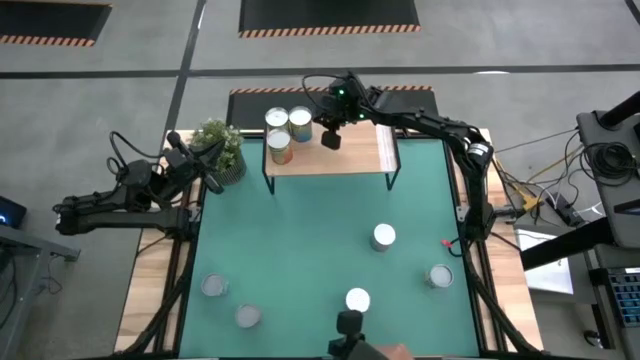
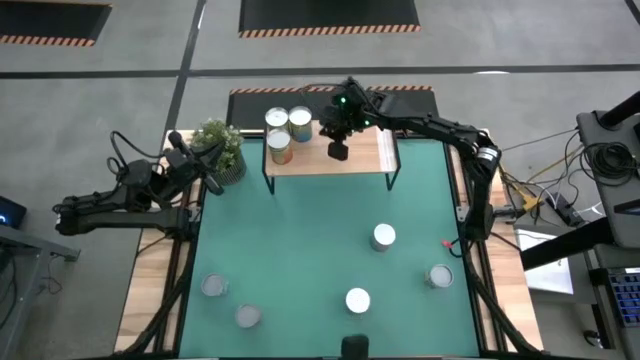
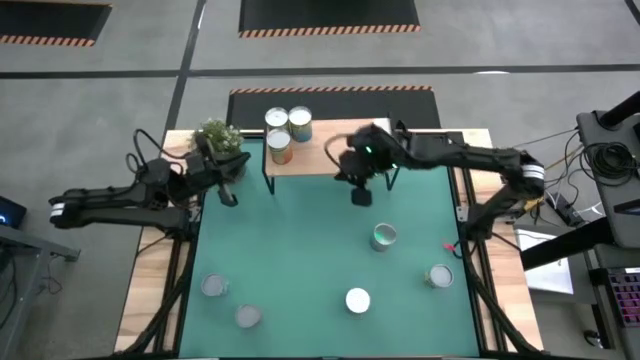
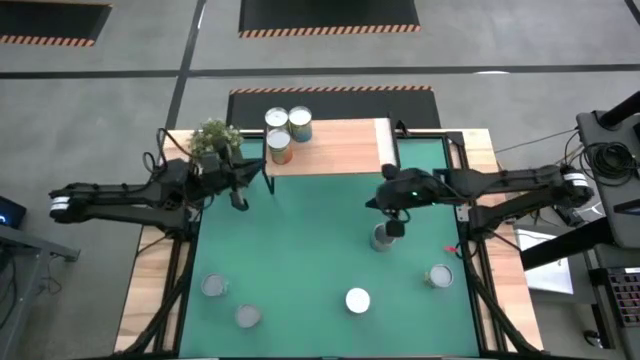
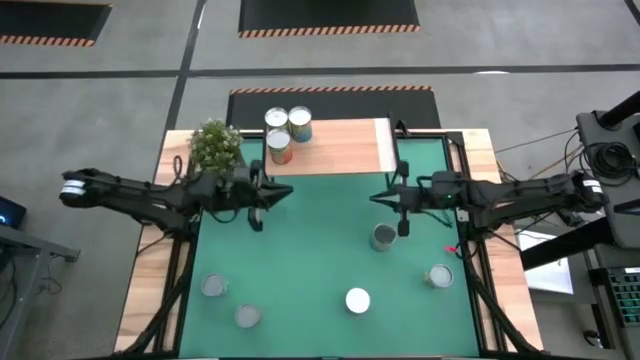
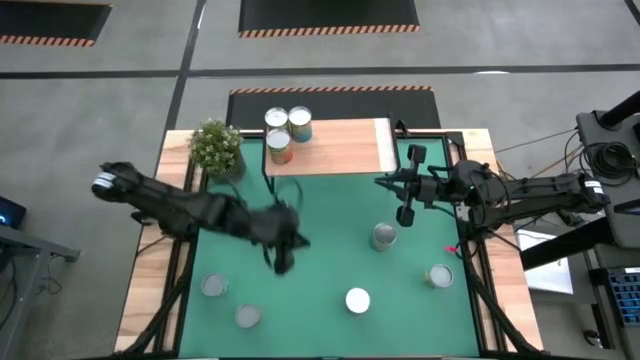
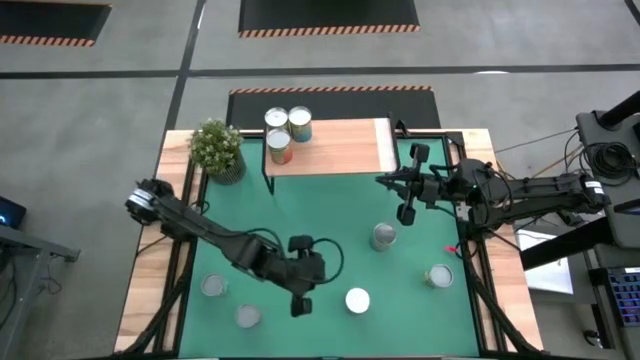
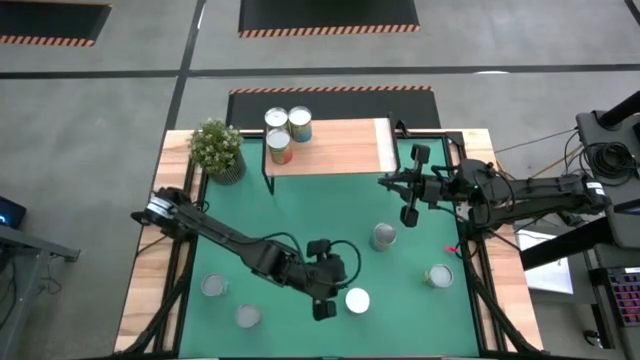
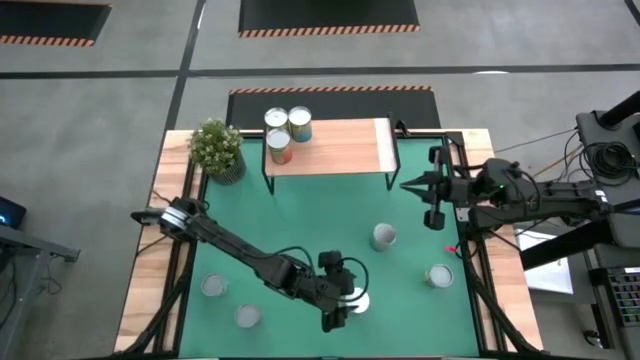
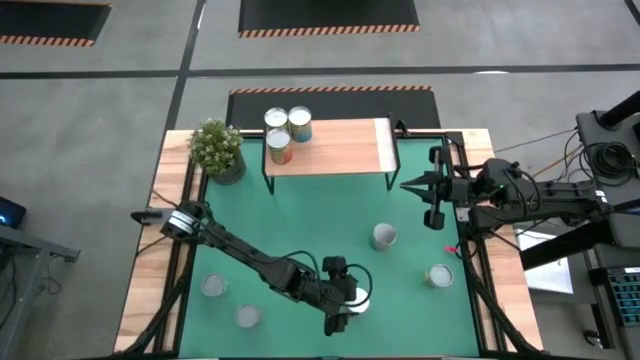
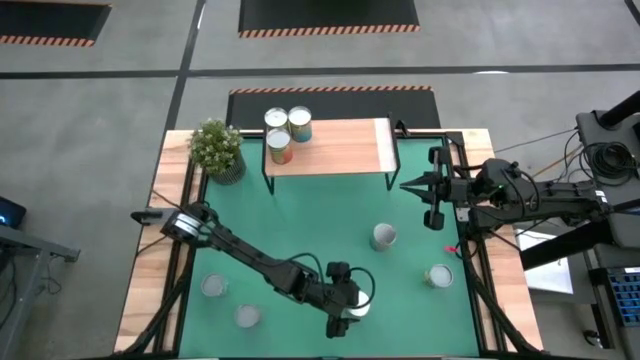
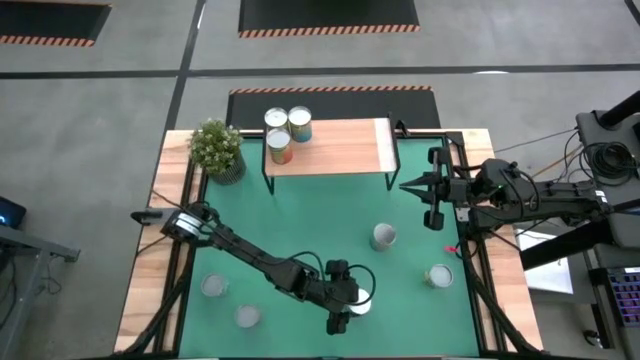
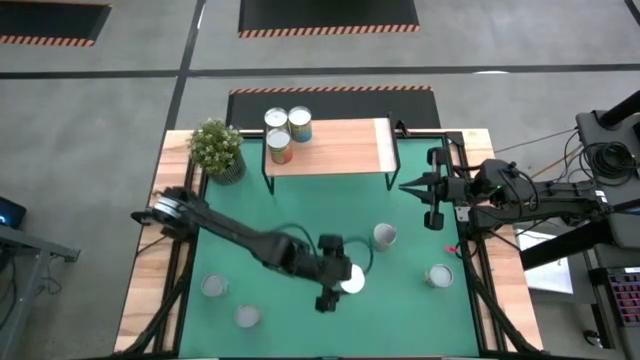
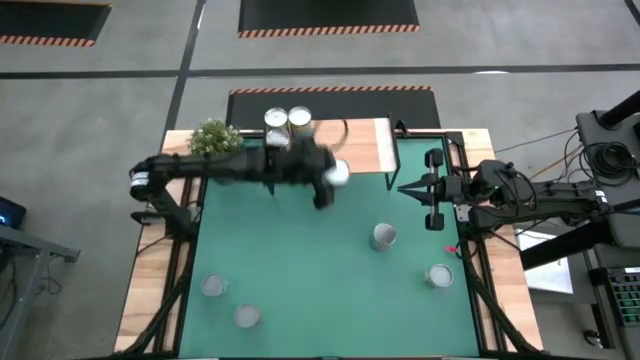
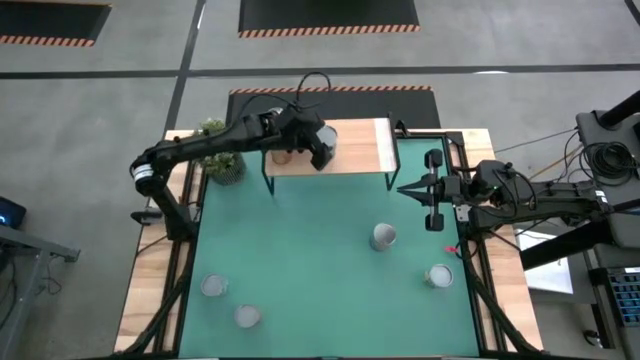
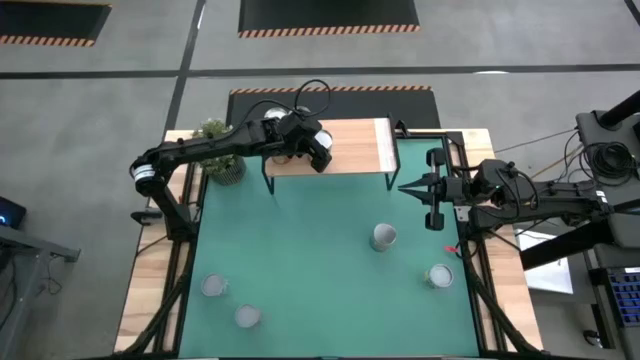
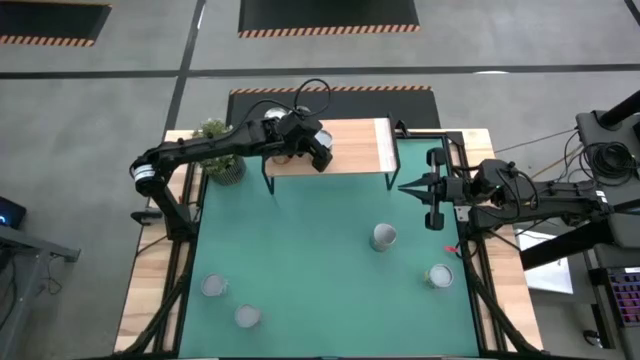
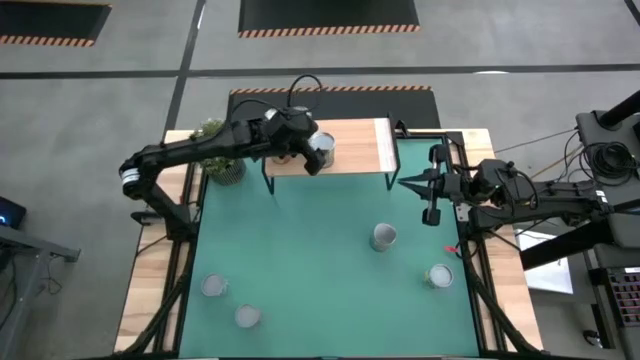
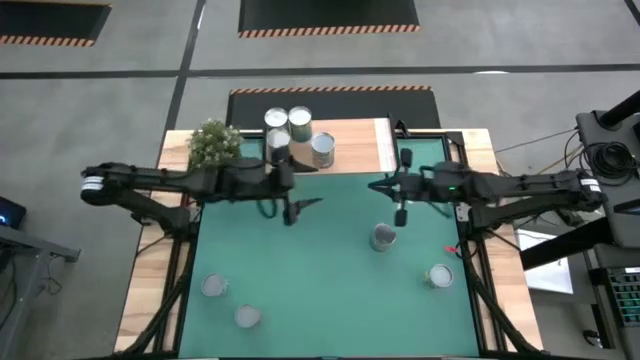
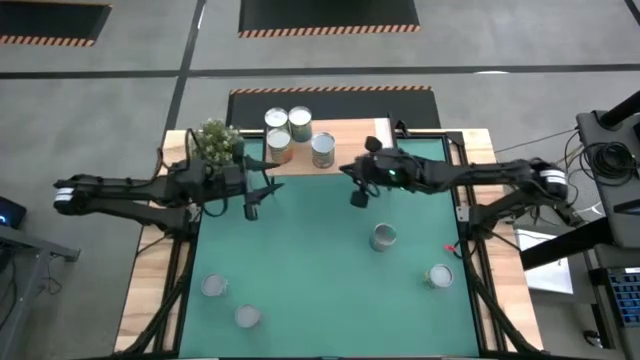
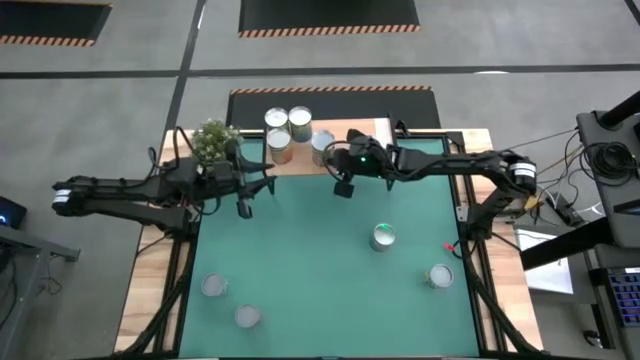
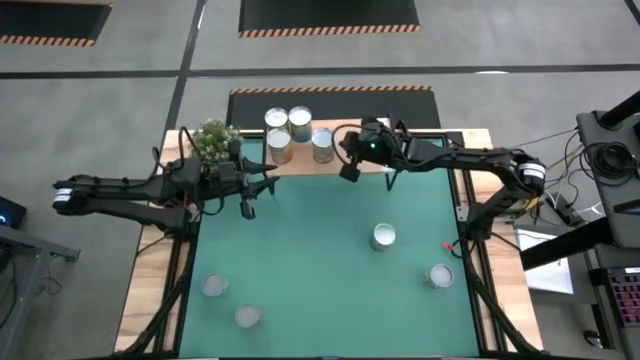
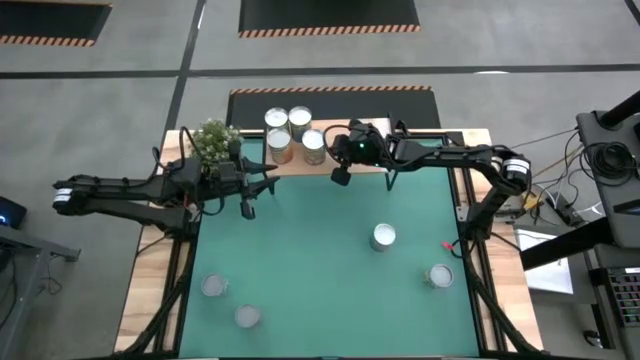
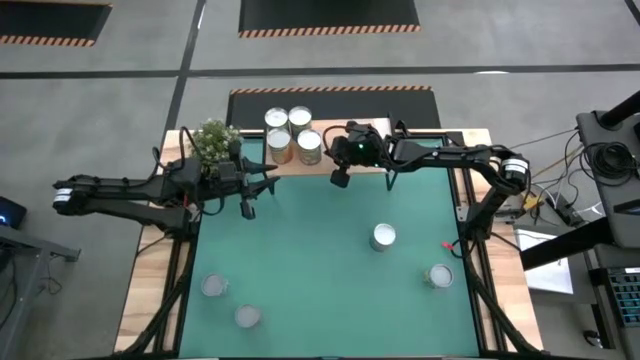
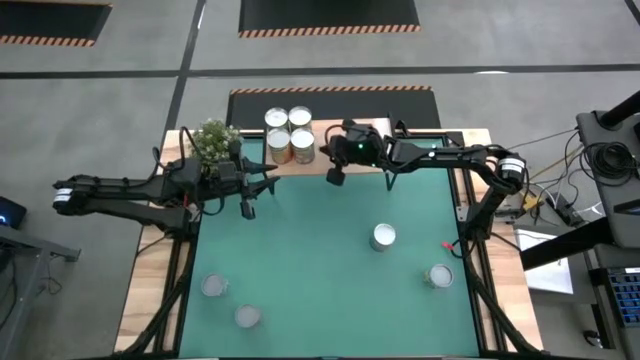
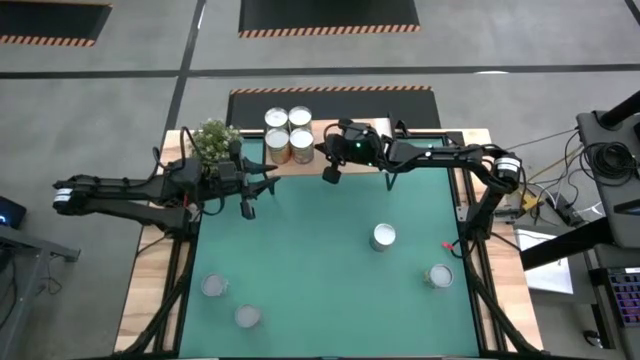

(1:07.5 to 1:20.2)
Task: Pick and place cans onto a shelf
Put the big canned peaches on the shelf aligned with the other big canned cherries

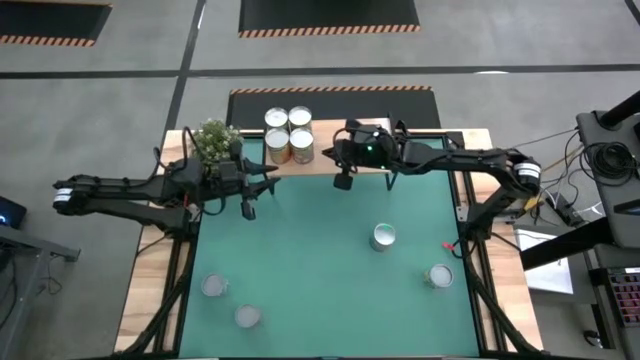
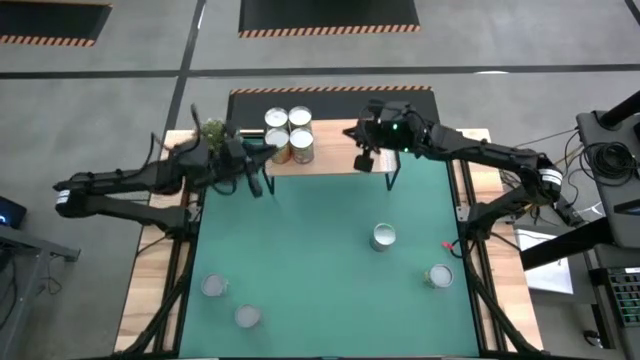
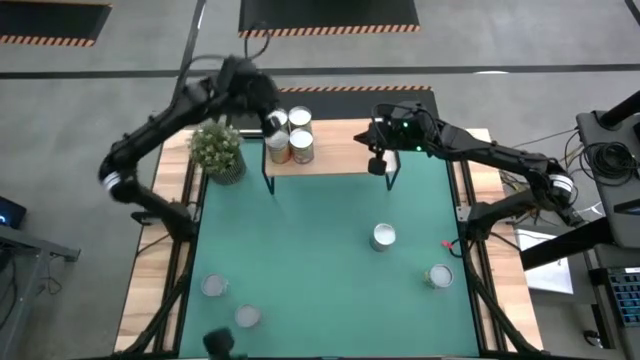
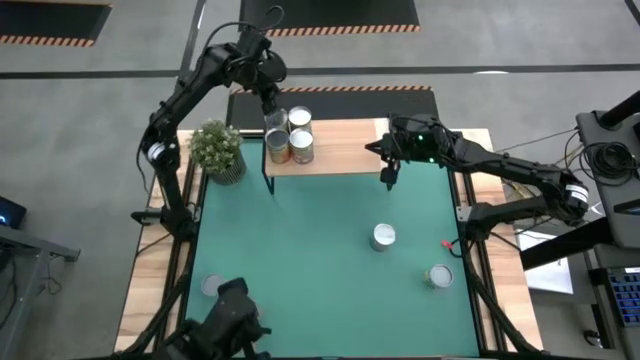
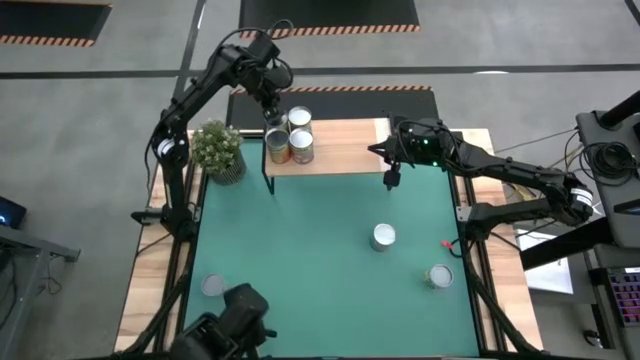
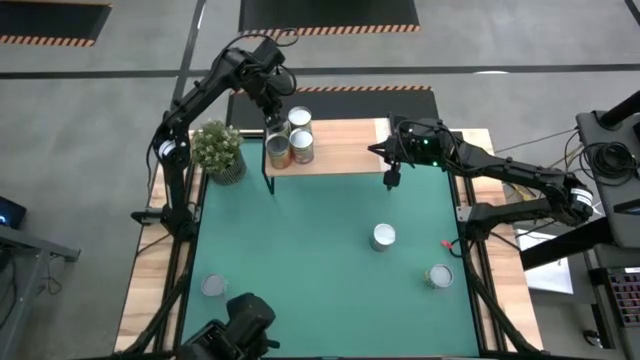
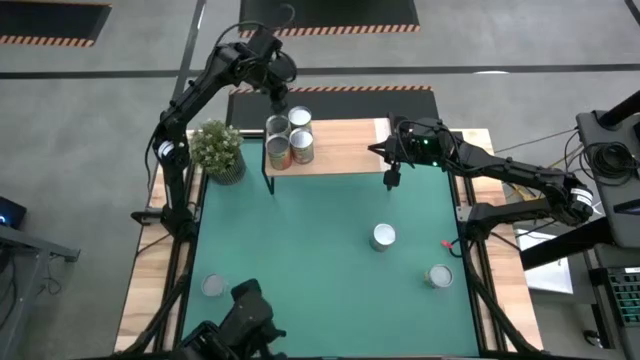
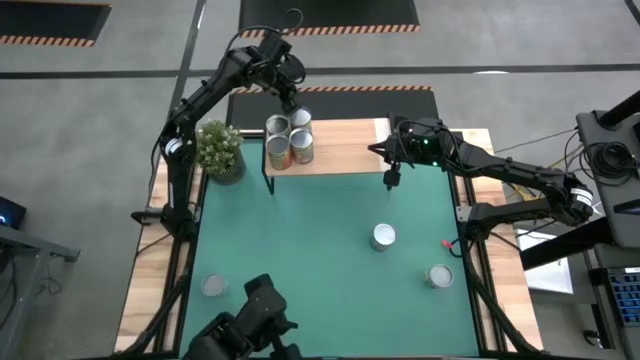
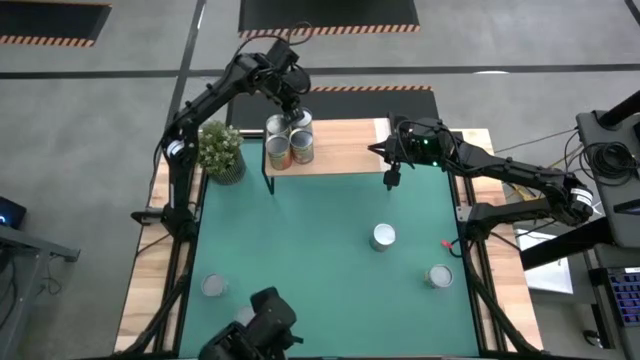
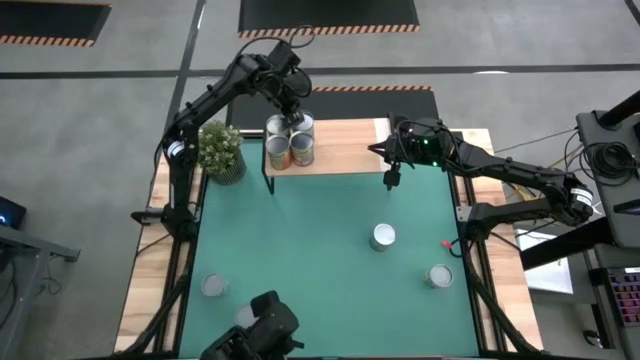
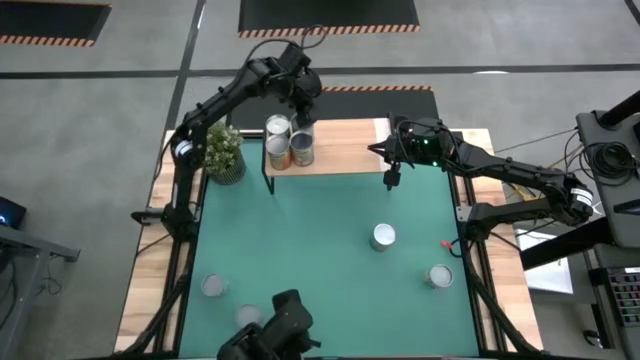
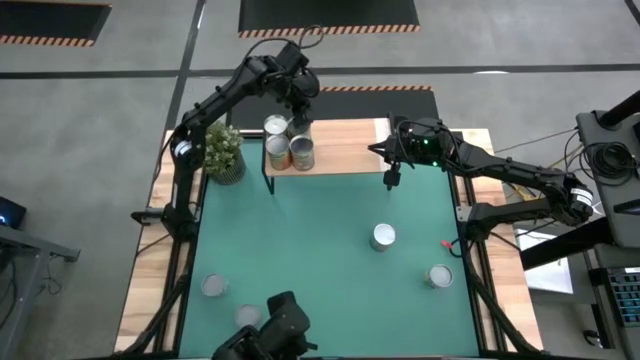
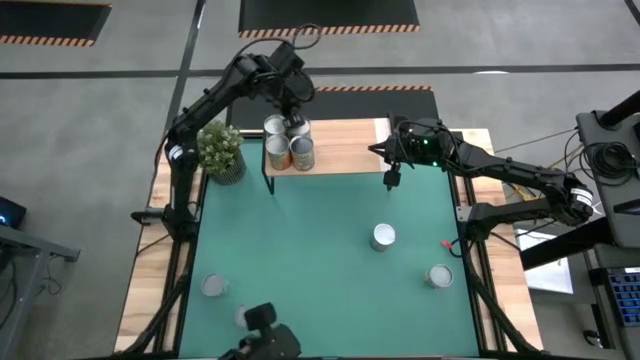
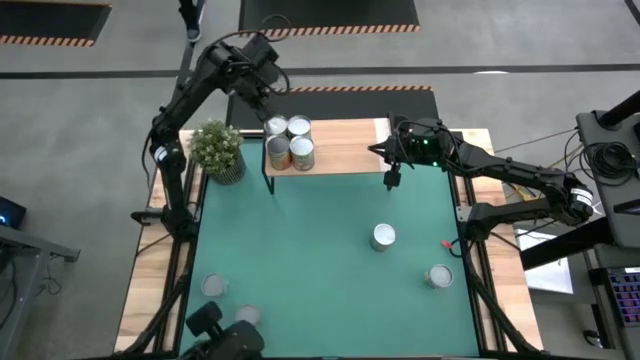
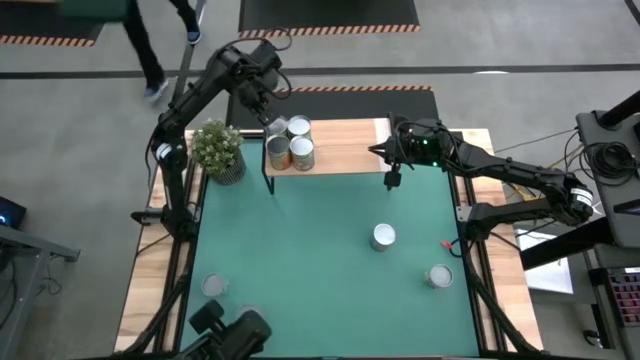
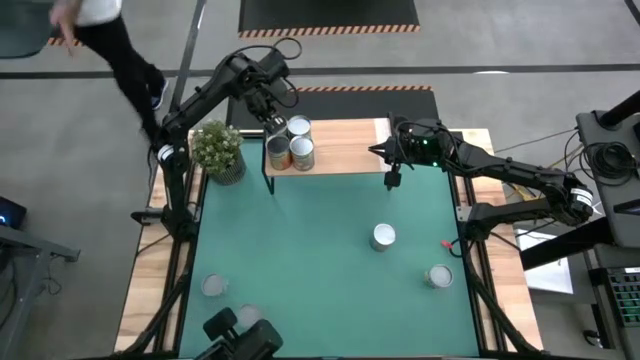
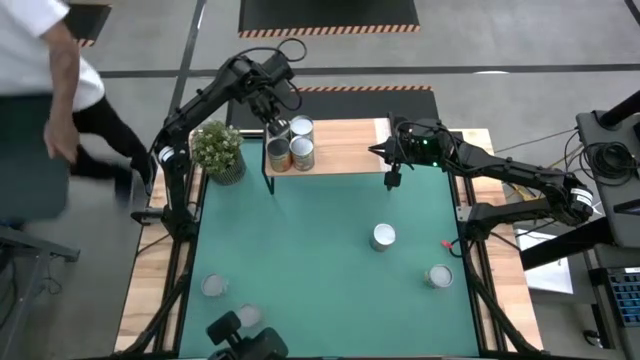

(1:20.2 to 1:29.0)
Adjust the big colored fruit cans on the shelf
